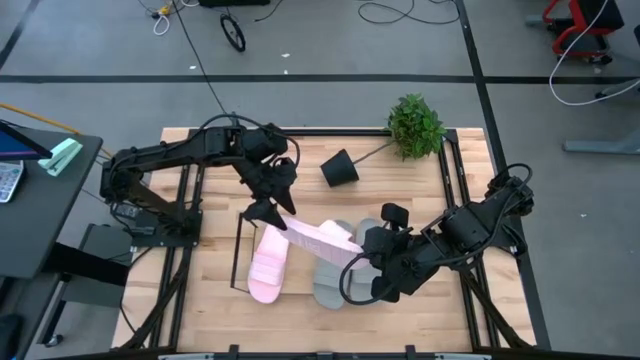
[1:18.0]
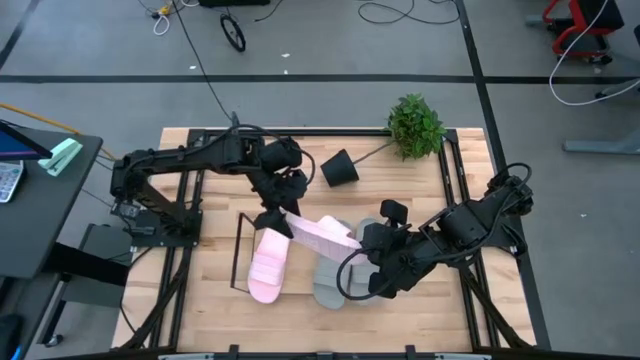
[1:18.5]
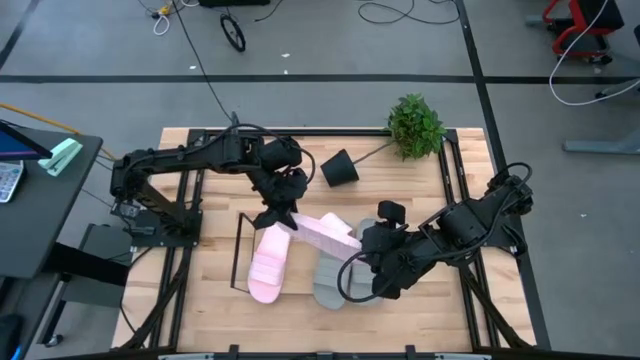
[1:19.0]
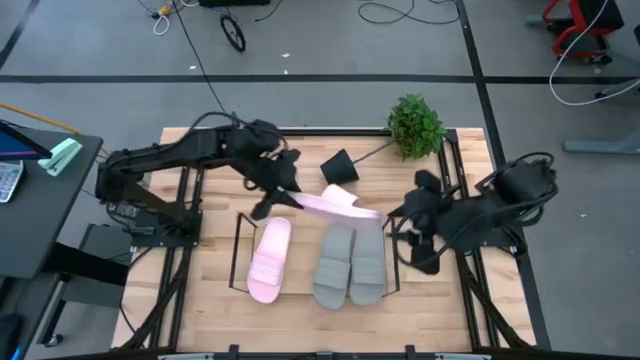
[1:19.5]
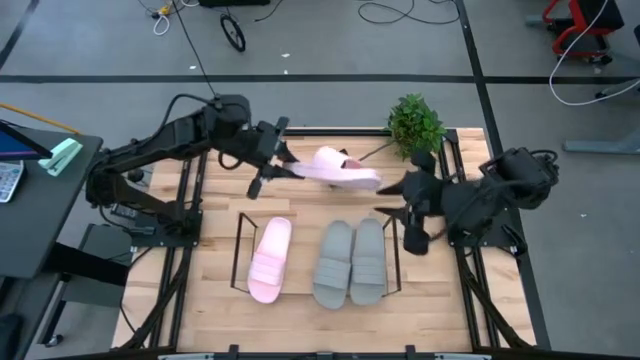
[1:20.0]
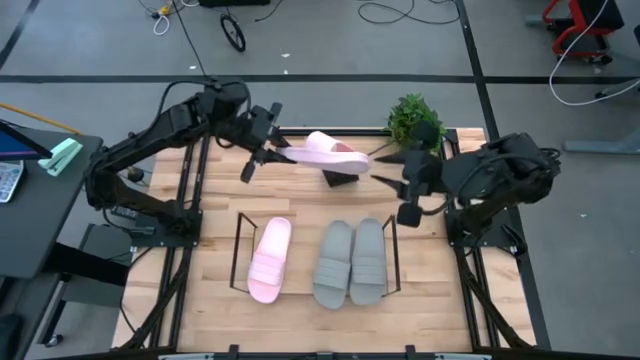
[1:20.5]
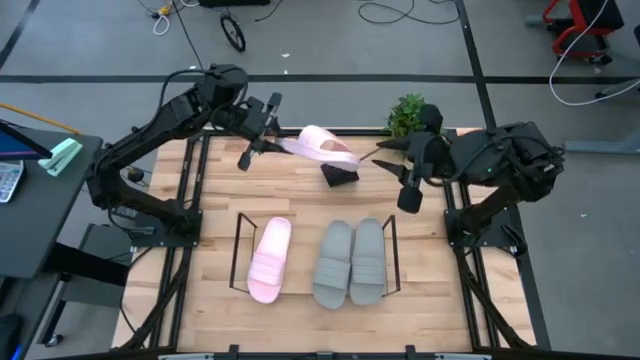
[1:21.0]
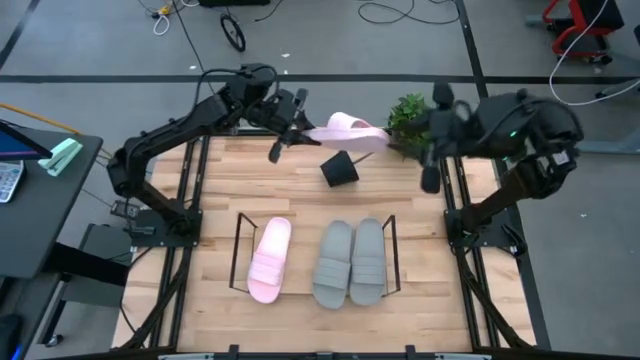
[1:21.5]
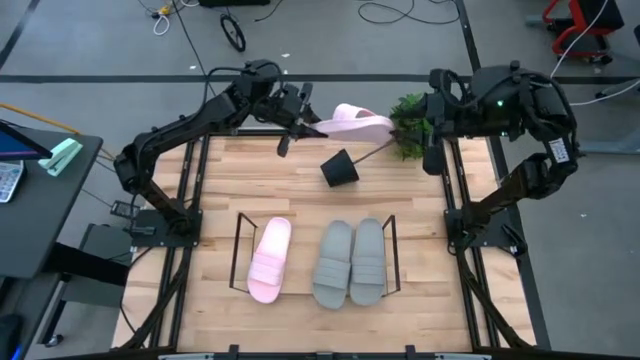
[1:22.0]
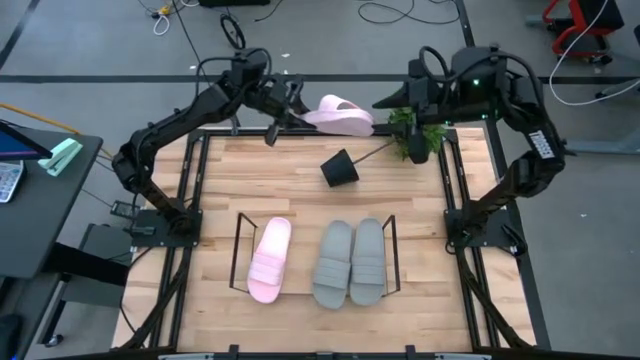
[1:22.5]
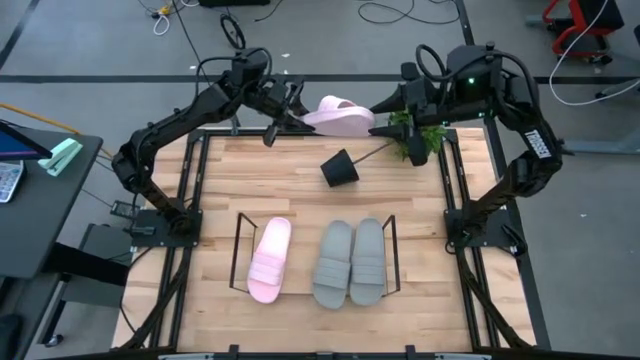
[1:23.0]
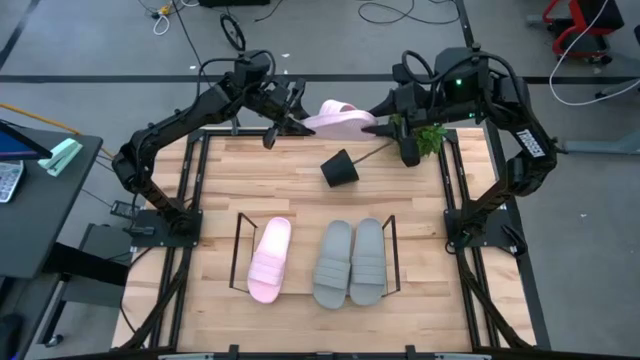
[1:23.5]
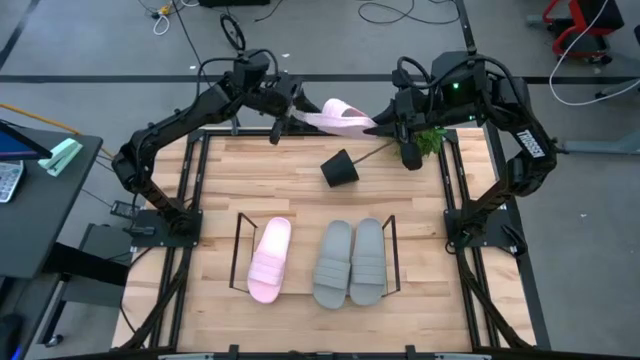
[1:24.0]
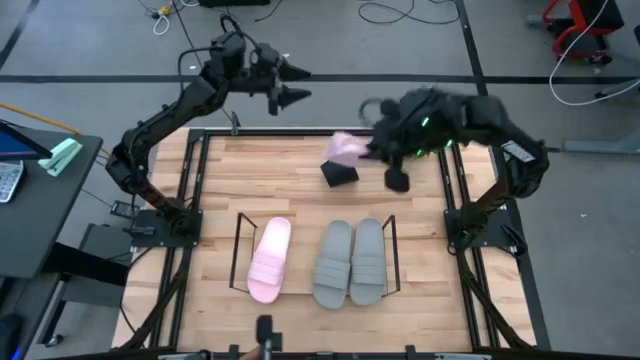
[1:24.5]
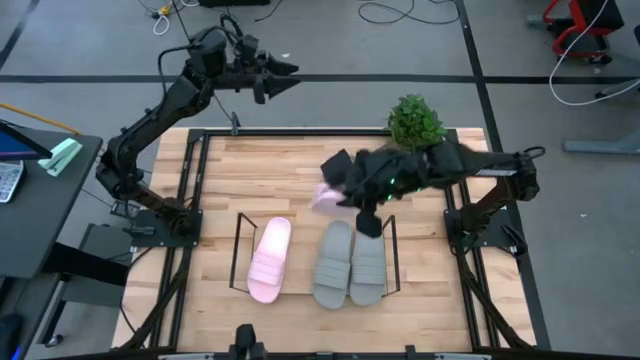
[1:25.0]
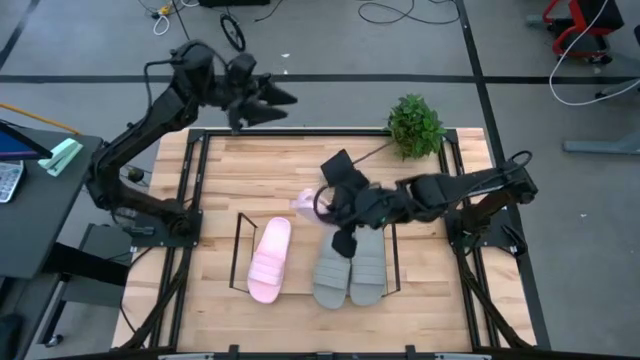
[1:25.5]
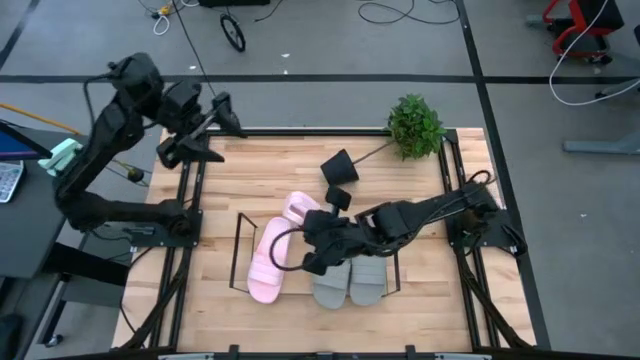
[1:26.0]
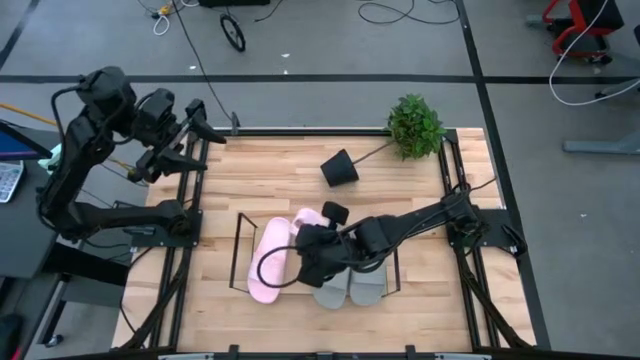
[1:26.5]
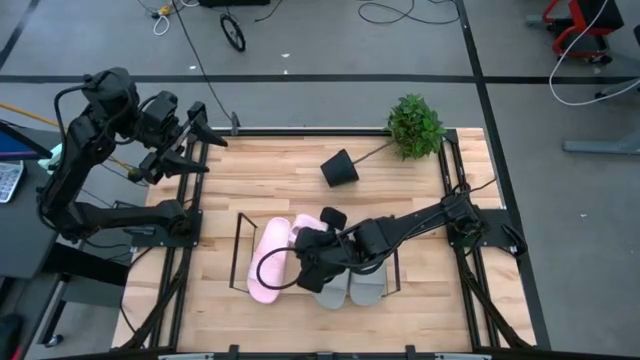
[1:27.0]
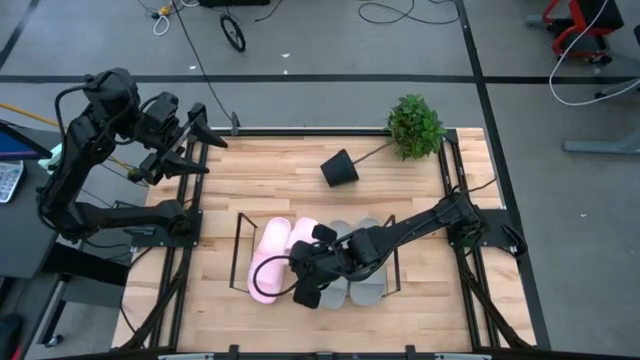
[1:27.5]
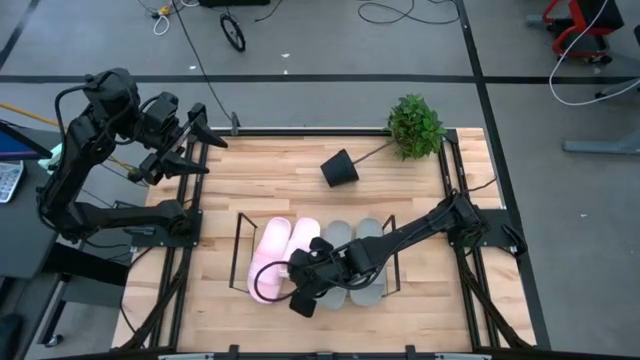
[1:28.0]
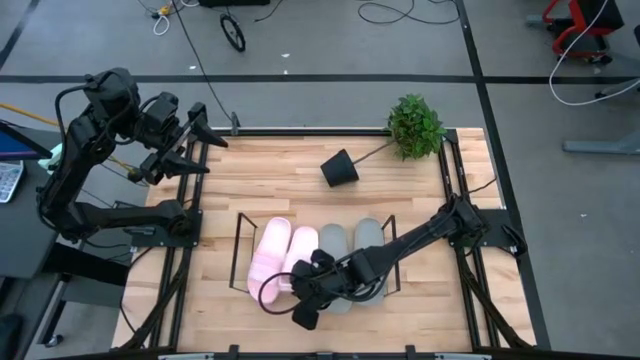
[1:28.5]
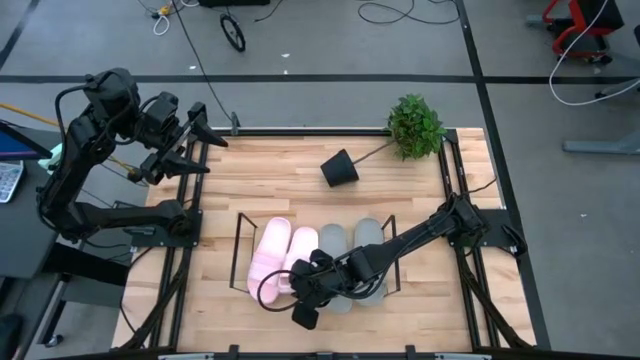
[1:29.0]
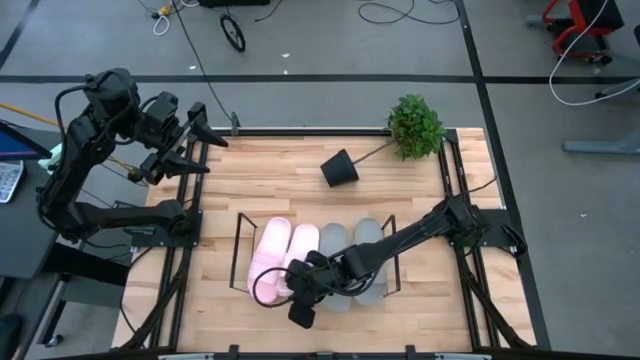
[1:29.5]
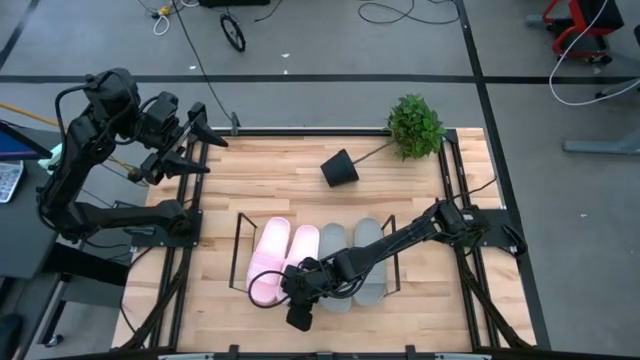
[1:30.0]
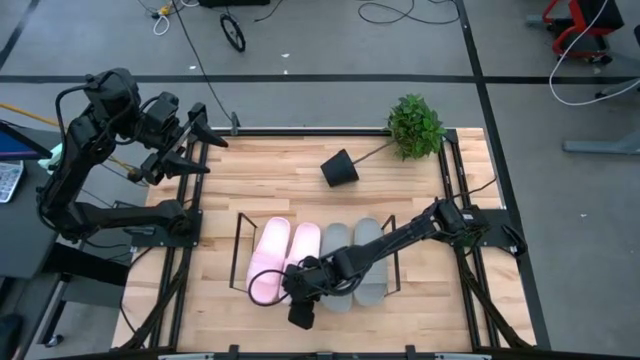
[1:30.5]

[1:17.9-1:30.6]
Task: Pick and place slides into the shelf
Align the pink slipper with the other pink slipper on the shelf

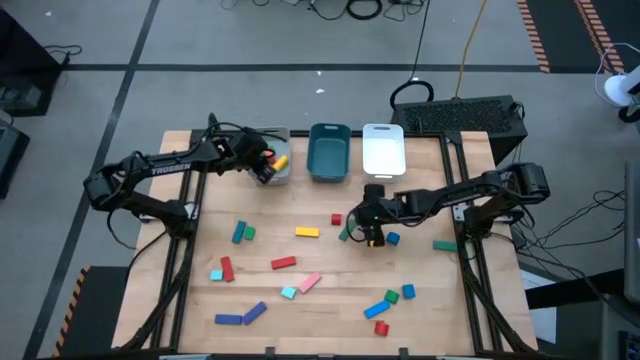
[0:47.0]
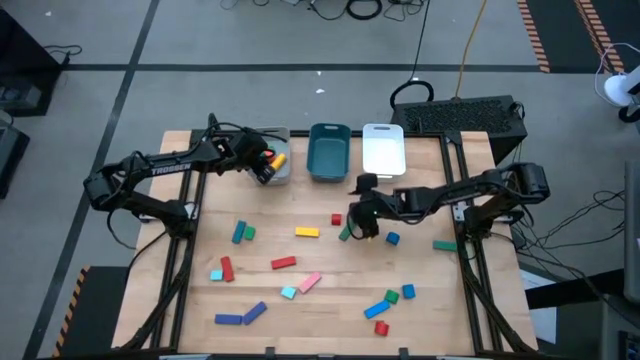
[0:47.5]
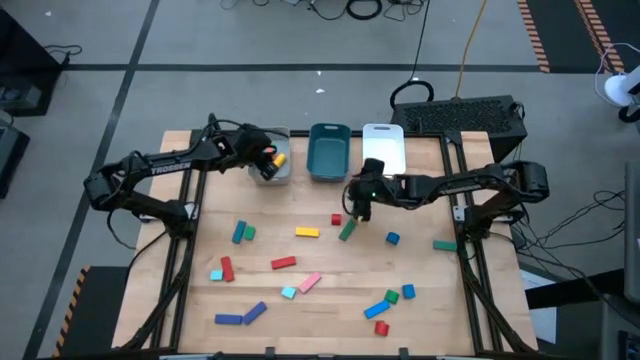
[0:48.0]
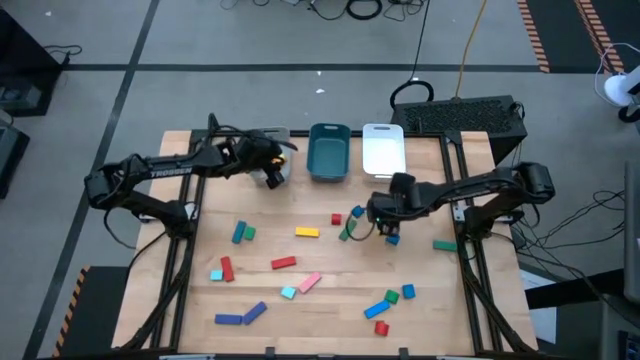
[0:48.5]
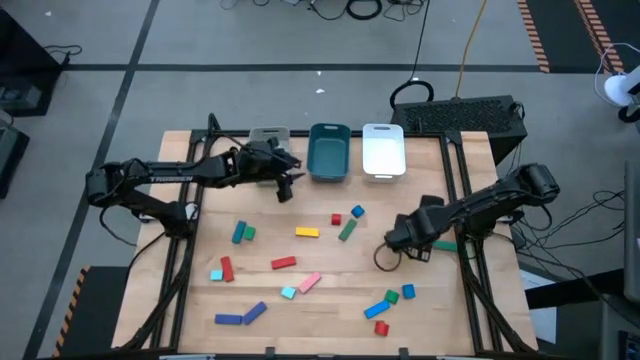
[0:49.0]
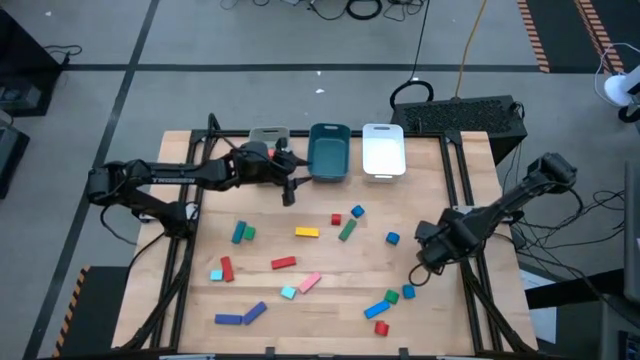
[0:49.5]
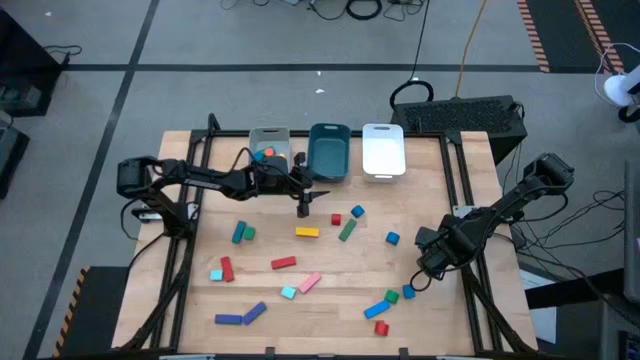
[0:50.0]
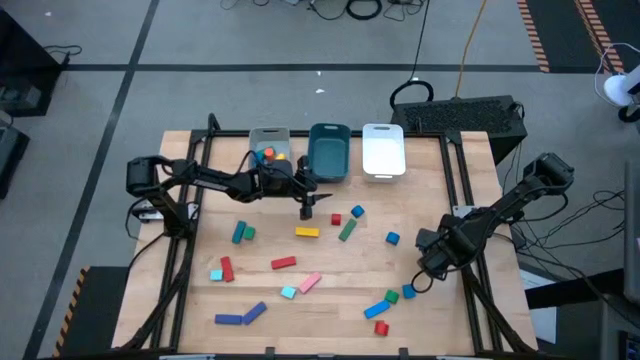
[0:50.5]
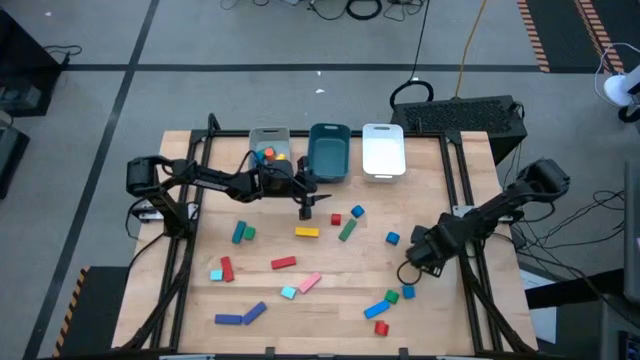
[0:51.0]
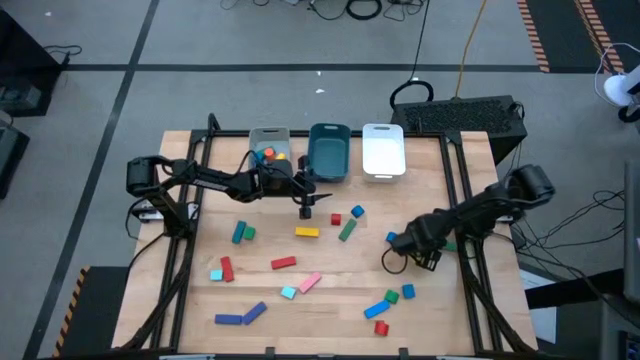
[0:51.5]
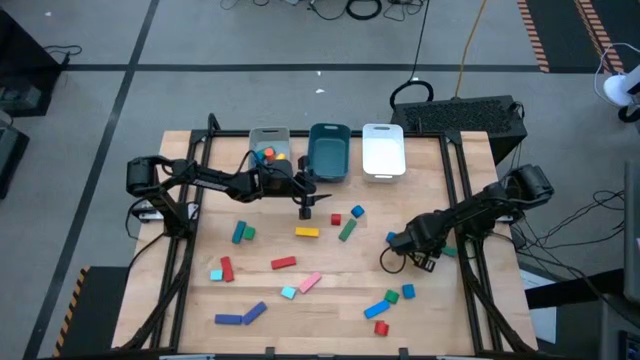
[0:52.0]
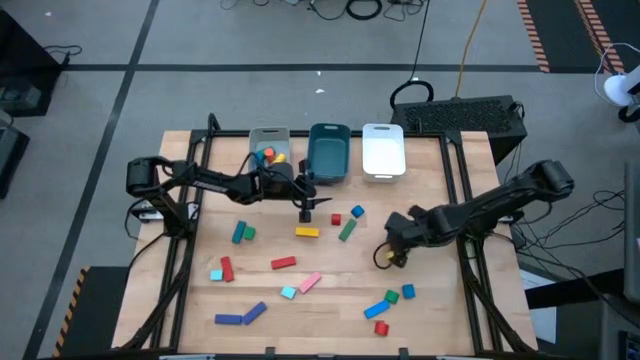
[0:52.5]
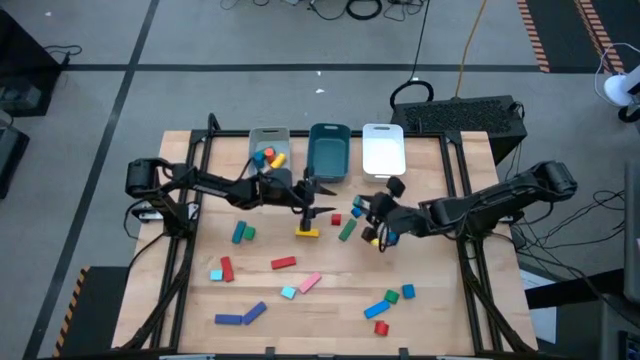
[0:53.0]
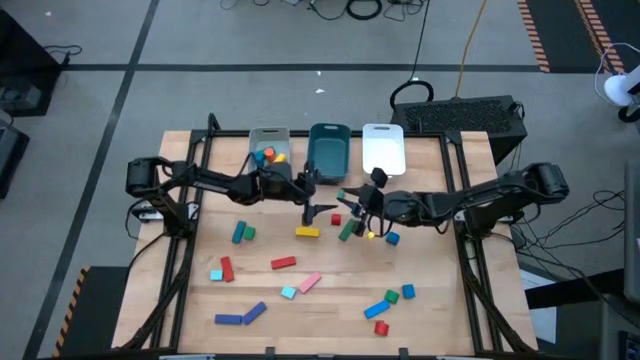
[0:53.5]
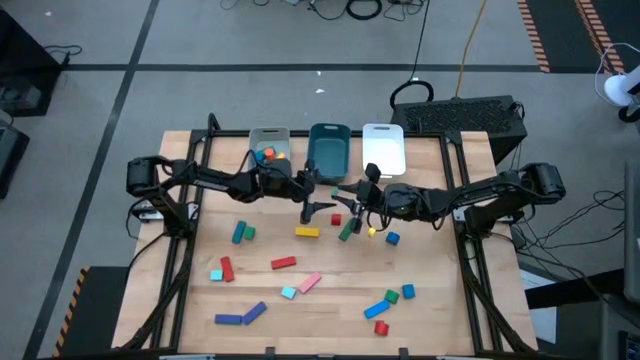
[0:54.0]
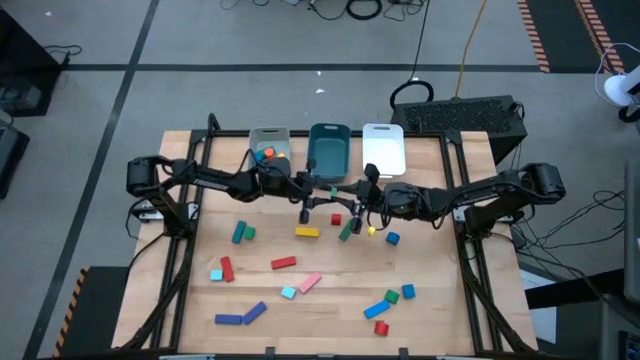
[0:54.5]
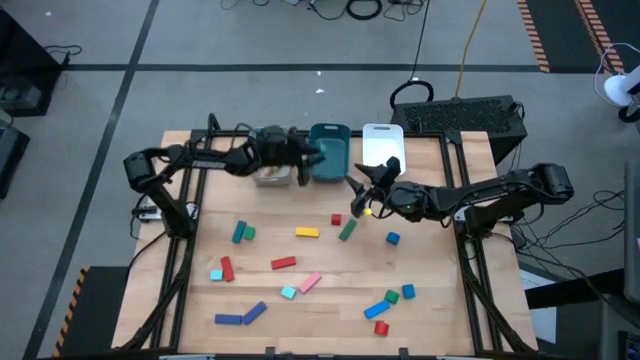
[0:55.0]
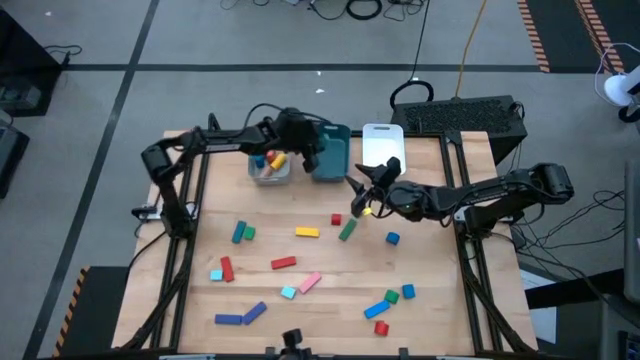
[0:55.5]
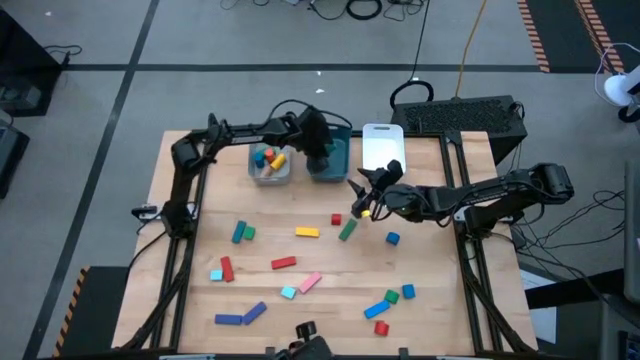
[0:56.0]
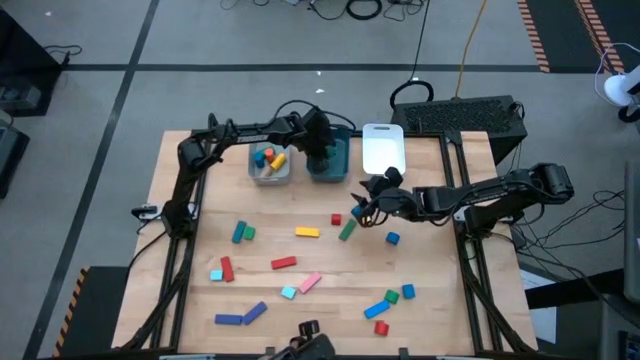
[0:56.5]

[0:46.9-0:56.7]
Task: Sort blocks by size
Put the right green rectangle block into the blue bin
